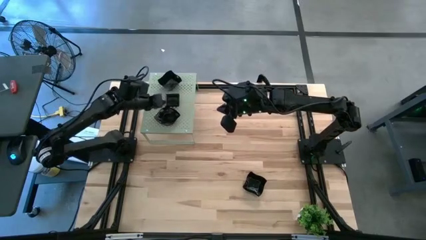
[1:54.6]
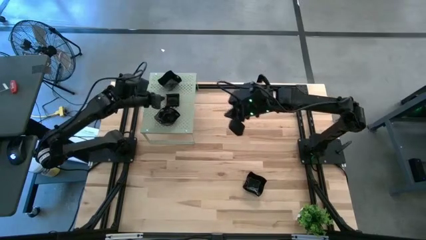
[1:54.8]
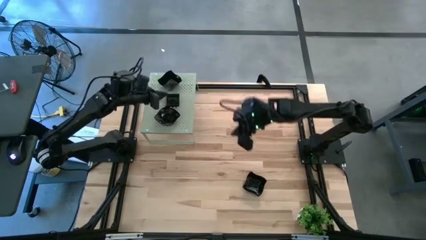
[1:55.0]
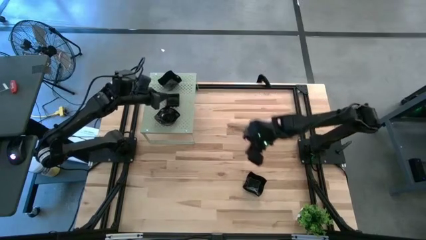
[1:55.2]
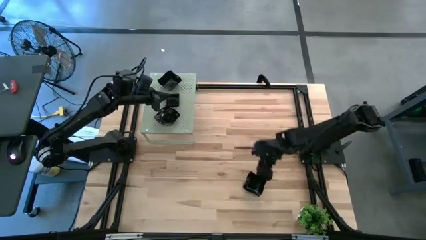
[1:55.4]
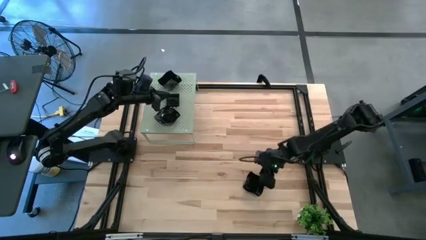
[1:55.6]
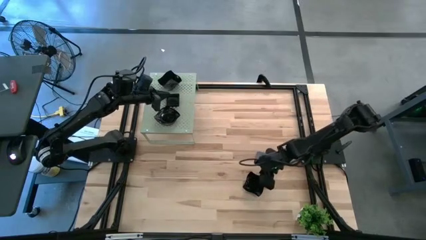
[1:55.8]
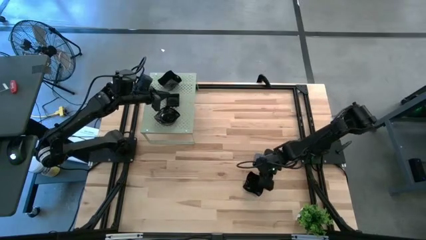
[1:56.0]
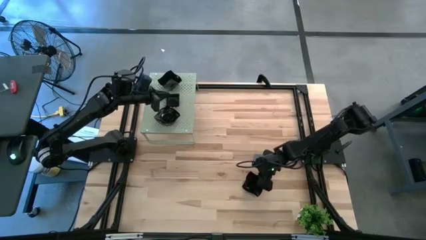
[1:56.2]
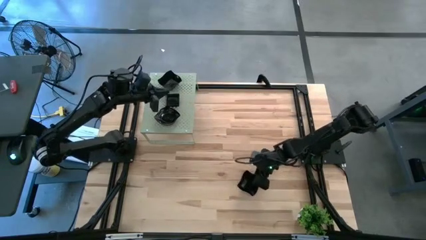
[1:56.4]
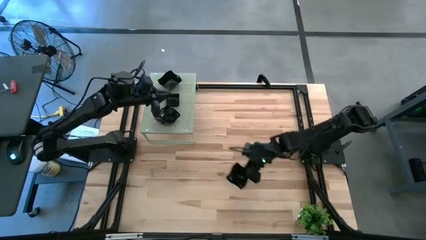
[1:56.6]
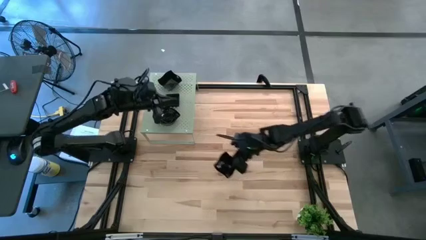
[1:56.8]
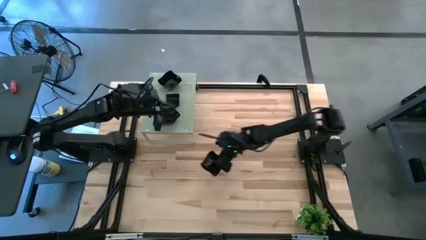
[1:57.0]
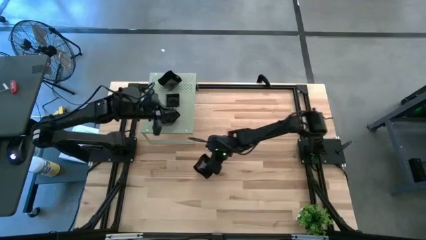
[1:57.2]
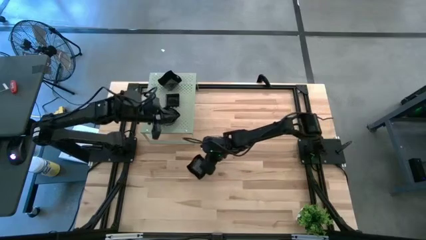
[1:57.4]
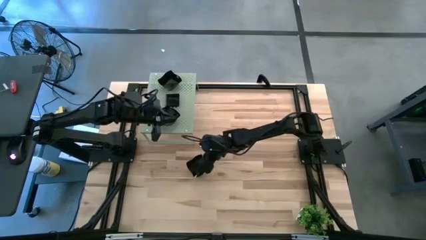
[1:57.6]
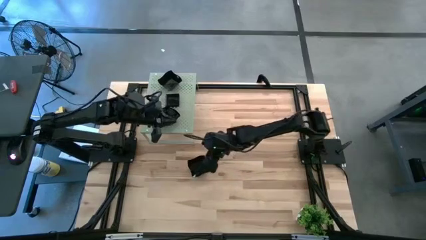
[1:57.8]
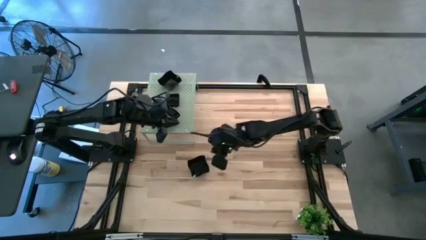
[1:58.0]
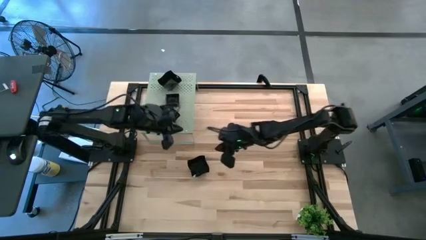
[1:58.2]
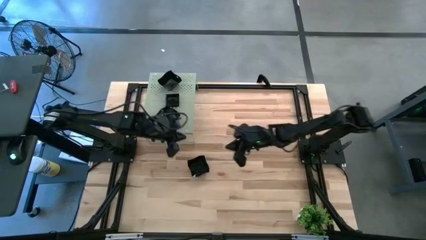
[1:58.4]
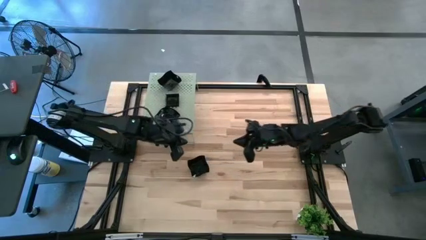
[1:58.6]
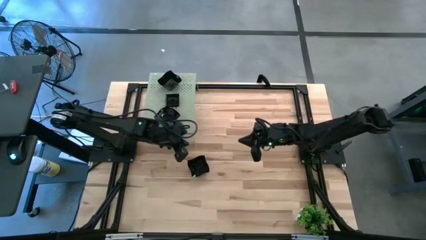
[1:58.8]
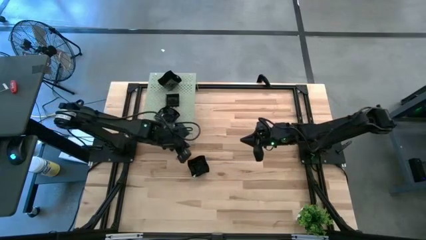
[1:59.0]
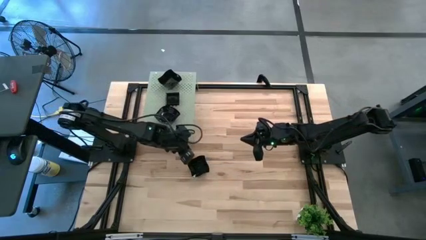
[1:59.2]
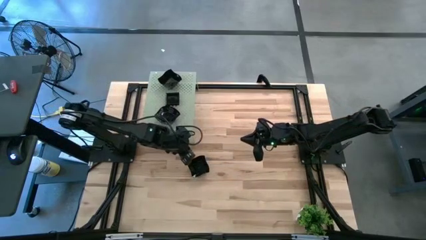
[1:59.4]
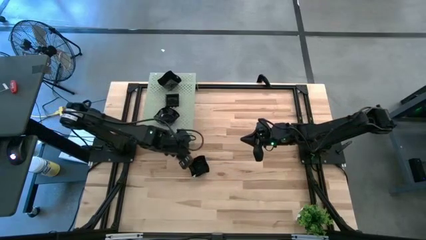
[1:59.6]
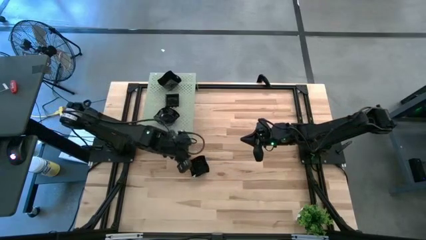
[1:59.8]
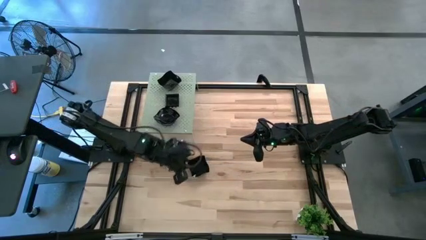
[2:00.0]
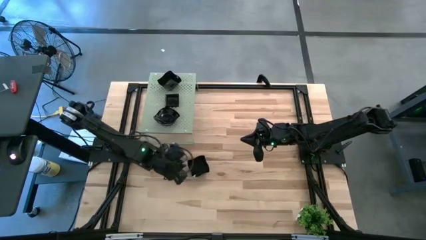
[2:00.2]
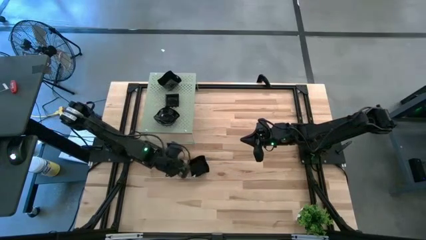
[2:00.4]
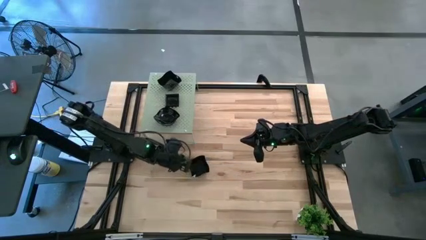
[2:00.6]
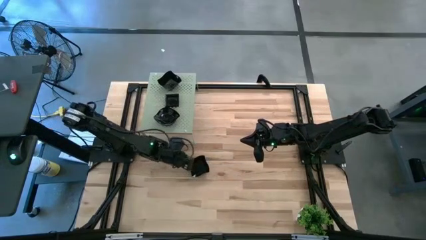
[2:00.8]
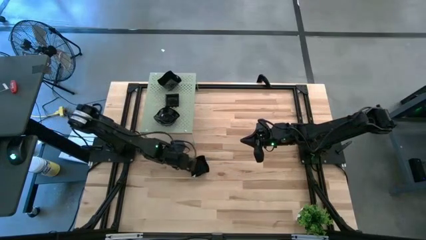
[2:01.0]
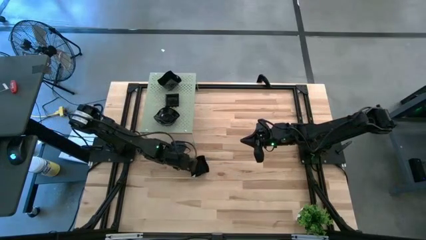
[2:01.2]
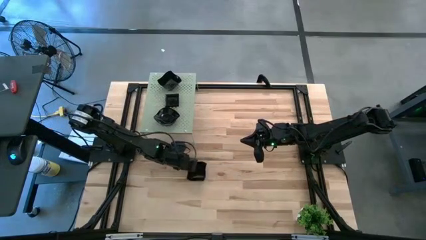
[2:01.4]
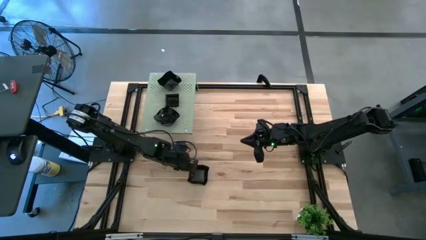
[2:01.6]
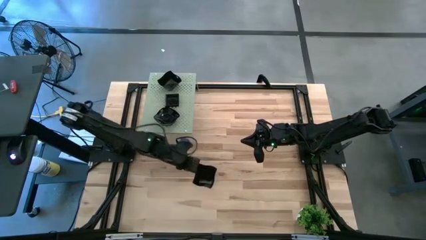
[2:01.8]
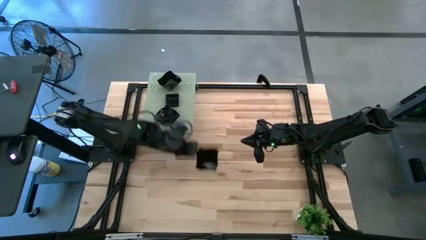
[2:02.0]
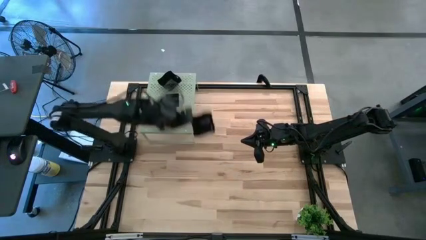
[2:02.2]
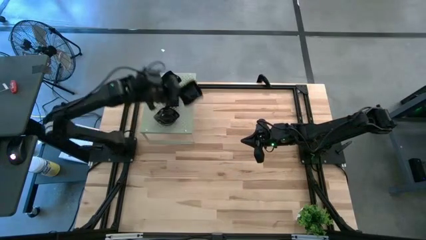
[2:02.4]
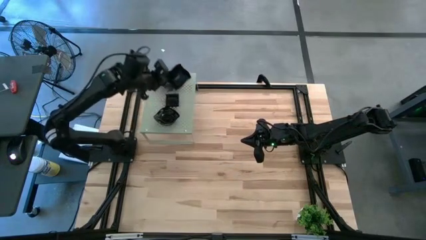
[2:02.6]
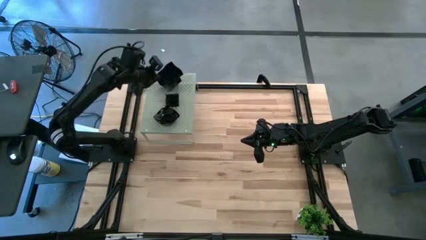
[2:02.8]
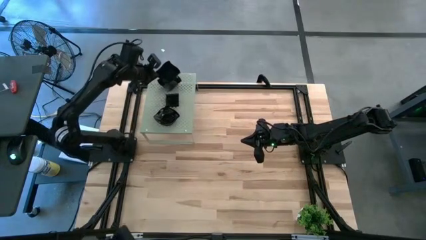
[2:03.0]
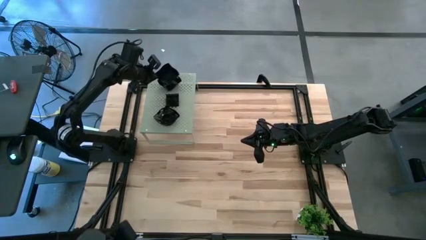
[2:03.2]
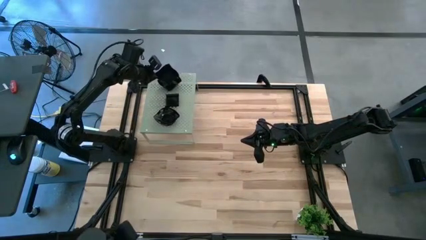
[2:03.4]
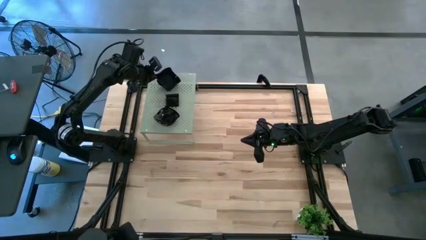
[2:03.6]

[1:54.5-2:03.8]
Task: Pick & Place Mini shaped plates
Stack the distorted square plate on the other distorted square plate on the shelf

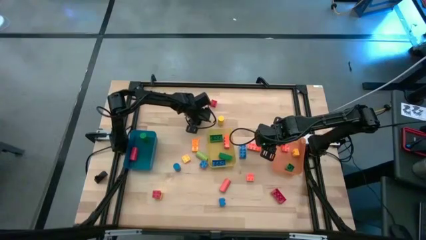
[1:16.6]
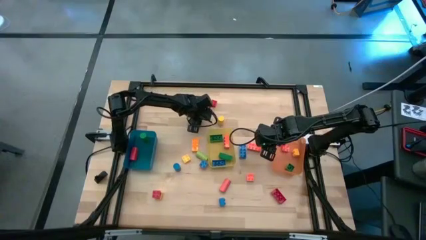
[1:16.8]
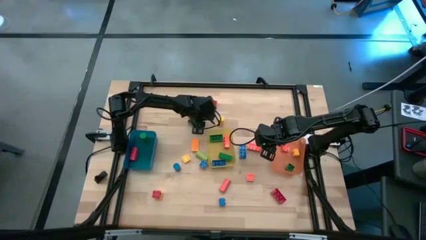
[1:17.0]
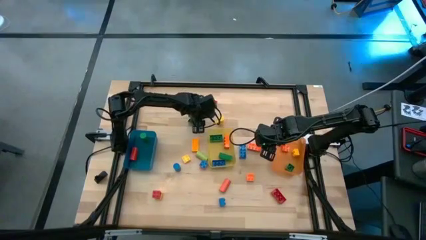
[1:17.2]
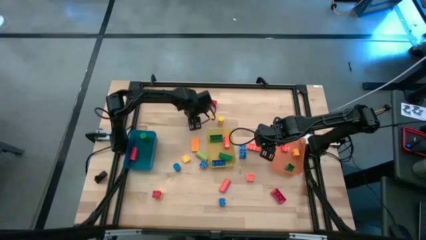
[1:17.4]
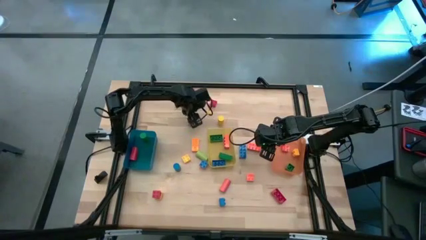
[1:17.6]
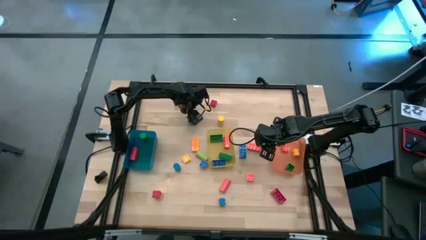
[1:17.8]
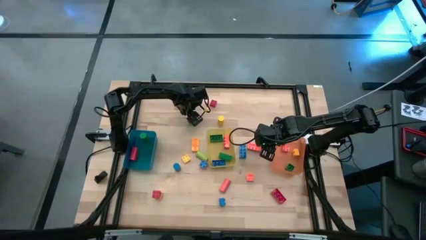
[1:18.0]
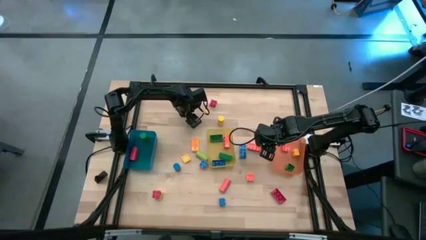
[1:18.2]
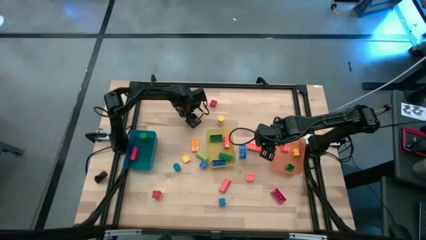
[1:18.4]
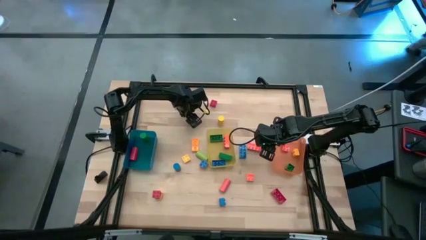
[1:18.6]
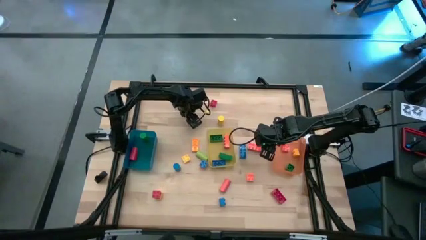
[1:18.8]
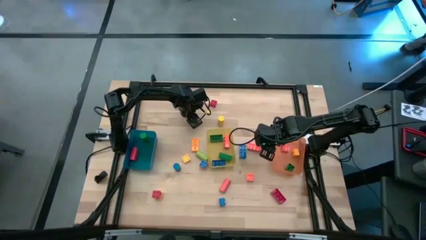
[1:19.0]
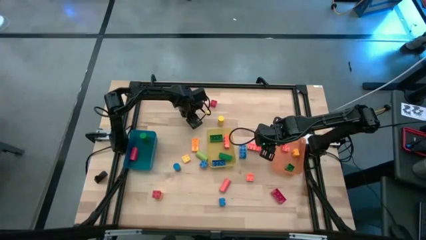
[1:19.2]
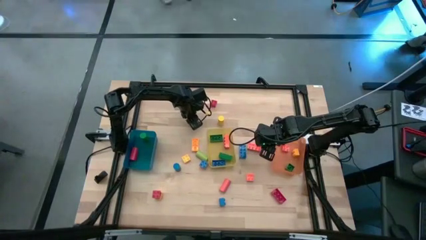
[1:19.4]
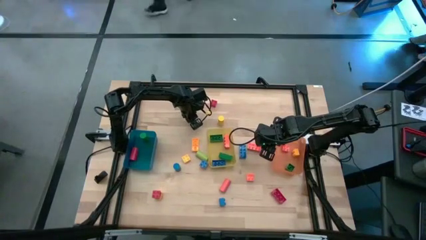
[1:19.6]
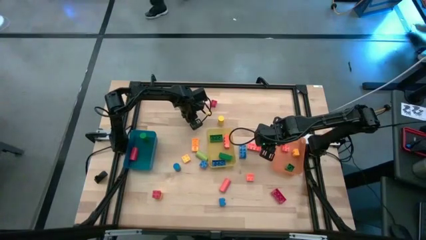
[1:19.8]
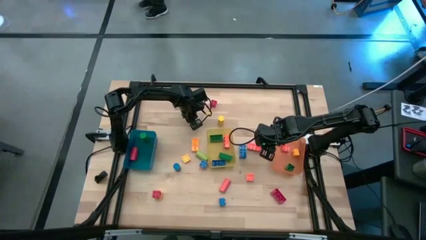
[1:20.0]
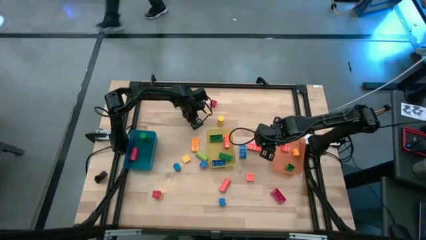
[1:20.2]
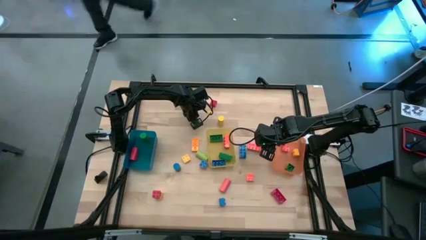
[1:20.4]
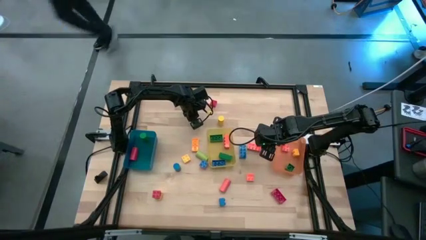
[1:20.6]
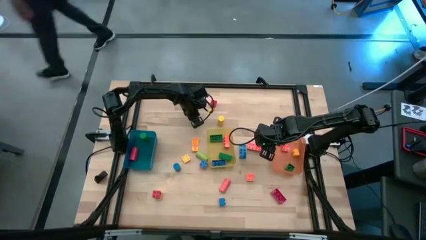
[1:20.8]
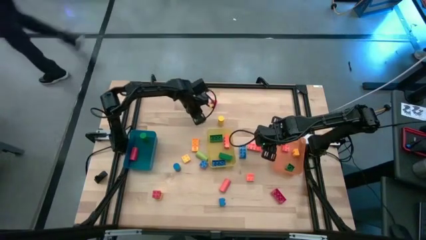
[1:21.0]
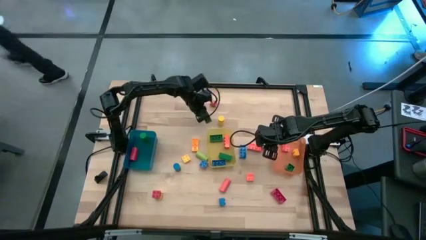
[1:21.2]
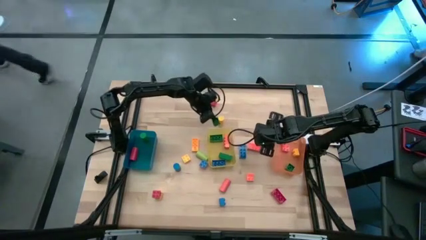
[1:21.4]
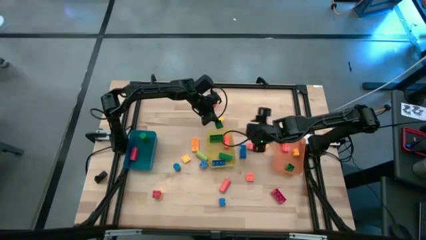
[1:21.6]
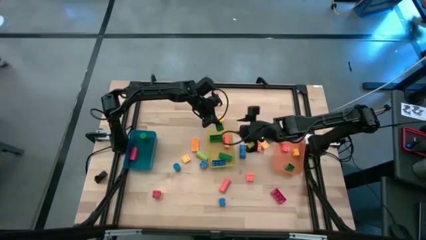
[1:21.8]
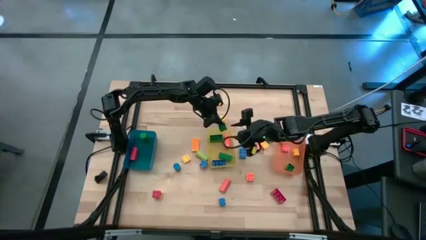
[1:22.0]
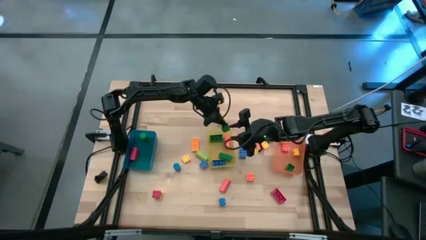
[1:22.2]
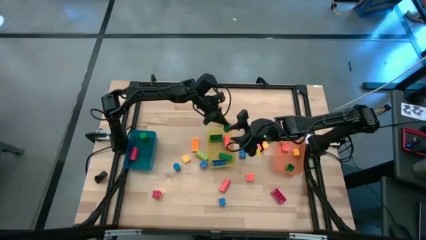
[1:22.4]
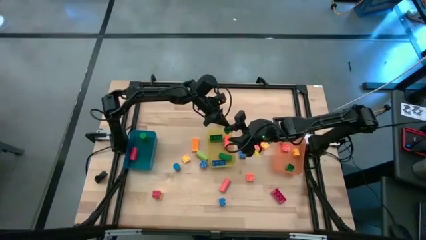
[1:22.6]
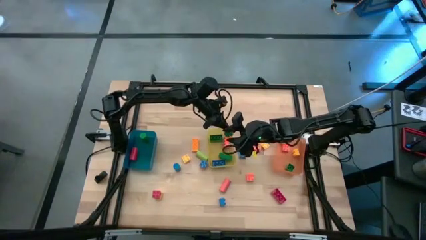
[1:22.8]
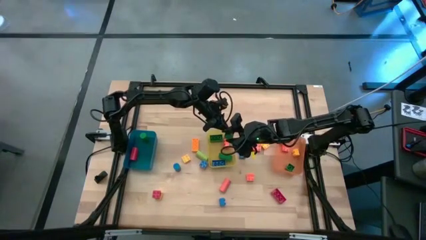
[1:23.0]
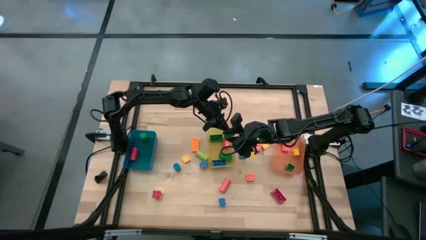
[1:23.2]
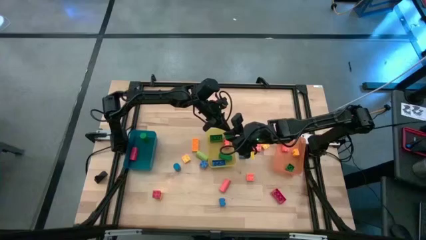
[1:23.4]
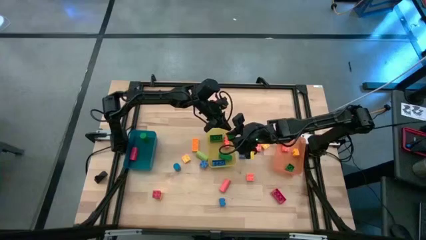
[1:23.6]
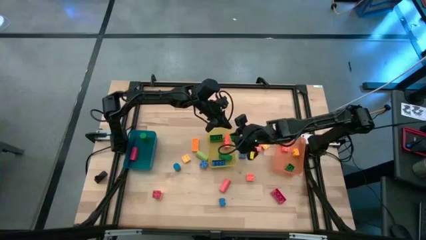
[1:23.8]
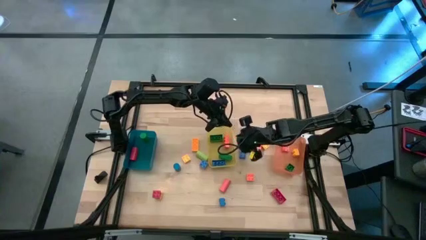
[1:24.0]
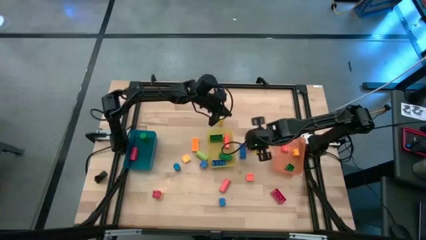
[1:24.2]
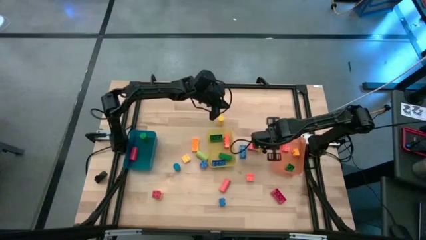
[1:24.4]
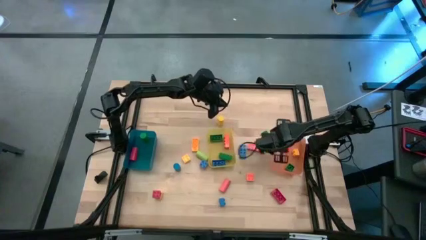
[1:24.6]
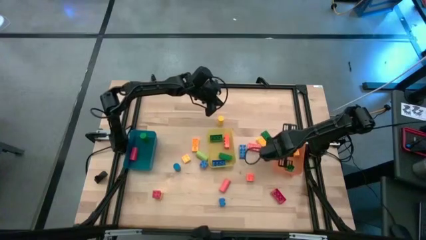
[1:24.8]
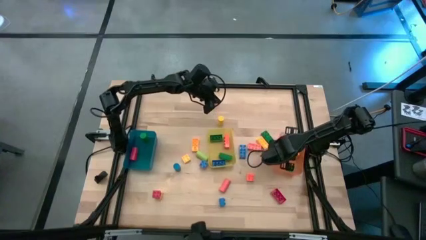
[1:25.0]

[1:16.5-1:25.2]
Task: Sort blocks by size
Put the green 4 stud game piece into the orange bin
